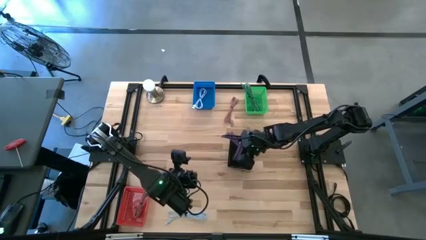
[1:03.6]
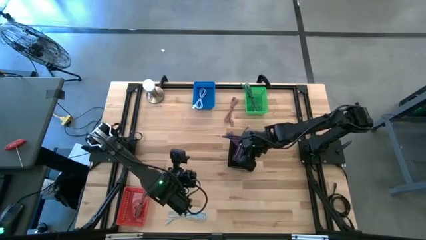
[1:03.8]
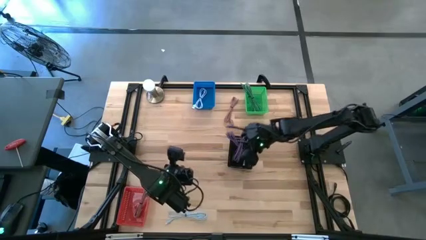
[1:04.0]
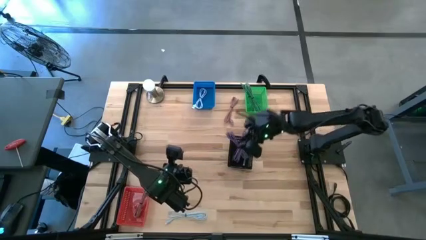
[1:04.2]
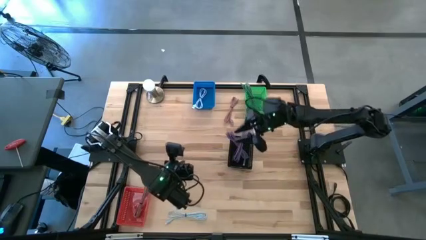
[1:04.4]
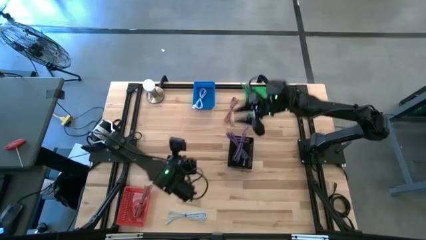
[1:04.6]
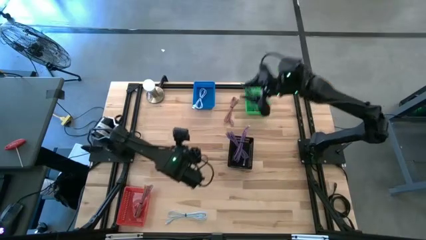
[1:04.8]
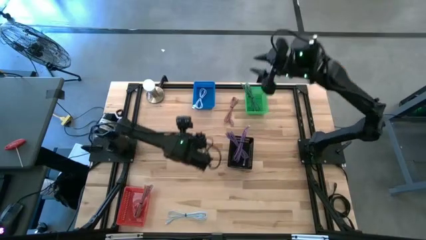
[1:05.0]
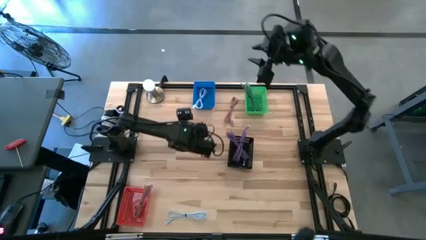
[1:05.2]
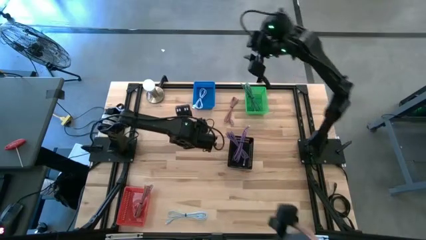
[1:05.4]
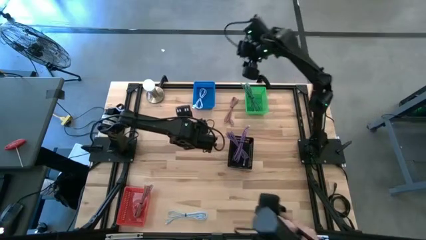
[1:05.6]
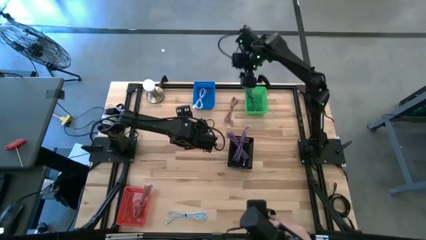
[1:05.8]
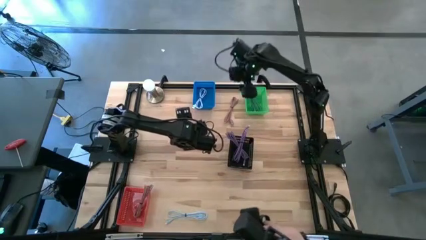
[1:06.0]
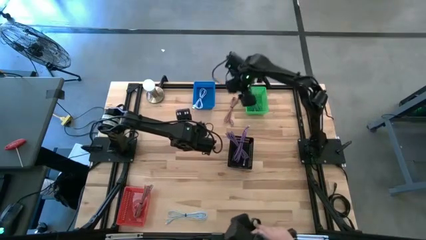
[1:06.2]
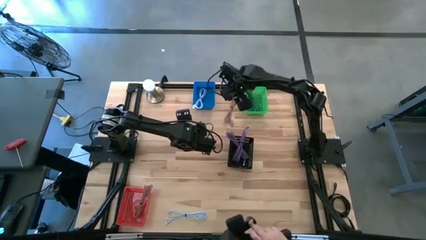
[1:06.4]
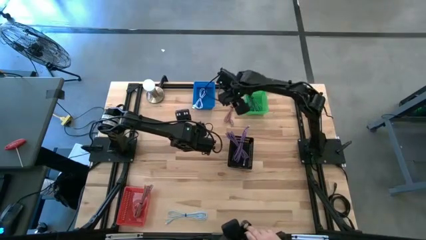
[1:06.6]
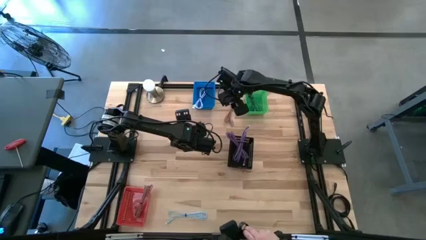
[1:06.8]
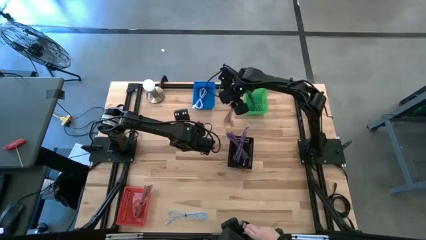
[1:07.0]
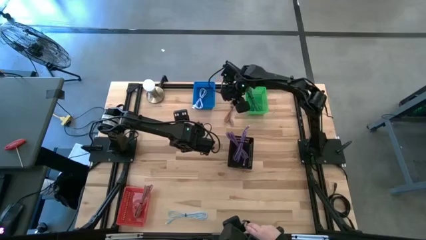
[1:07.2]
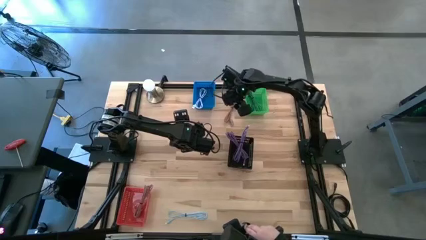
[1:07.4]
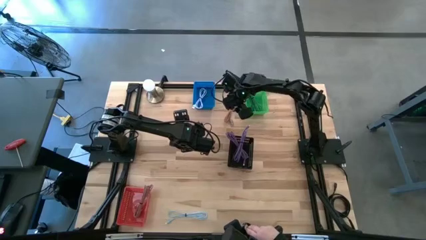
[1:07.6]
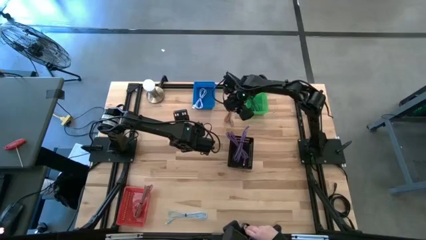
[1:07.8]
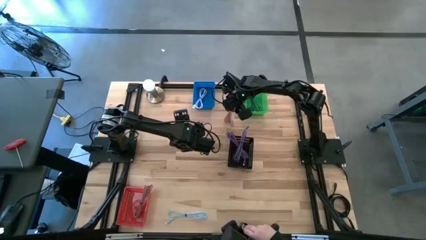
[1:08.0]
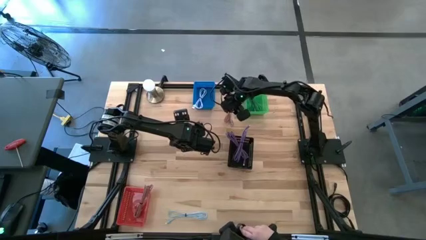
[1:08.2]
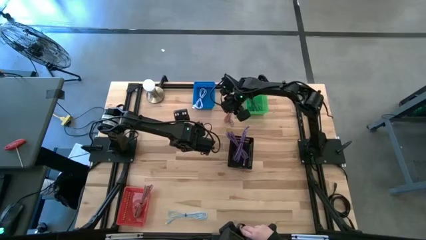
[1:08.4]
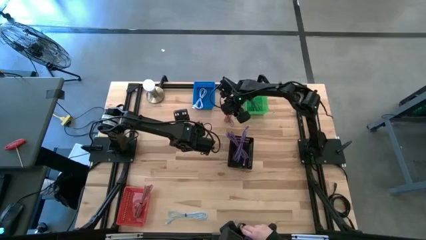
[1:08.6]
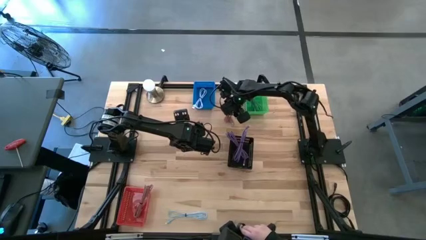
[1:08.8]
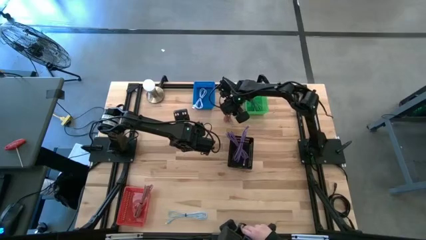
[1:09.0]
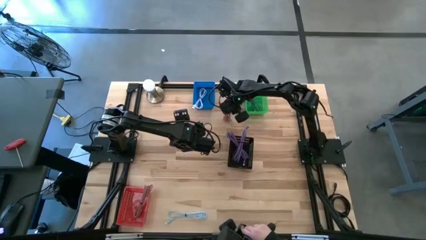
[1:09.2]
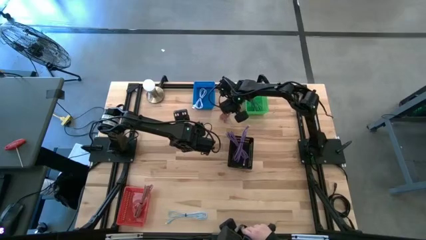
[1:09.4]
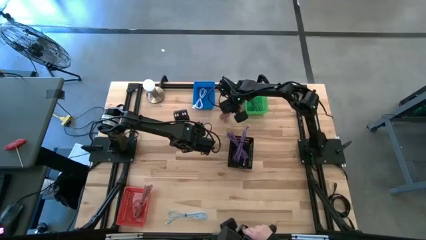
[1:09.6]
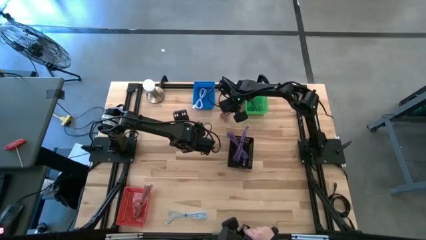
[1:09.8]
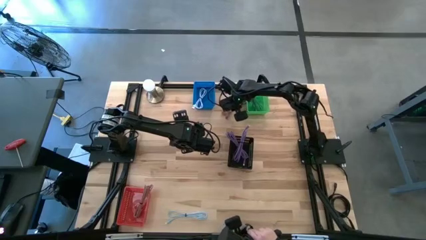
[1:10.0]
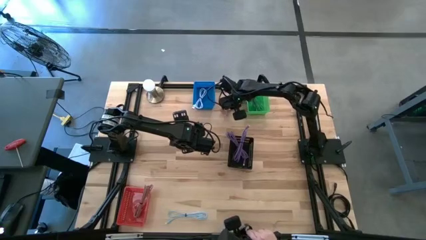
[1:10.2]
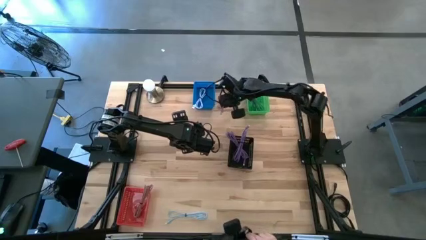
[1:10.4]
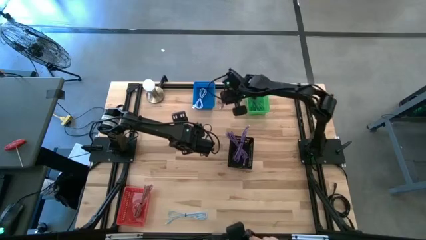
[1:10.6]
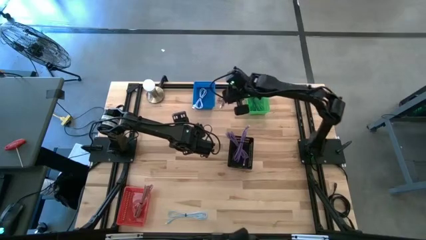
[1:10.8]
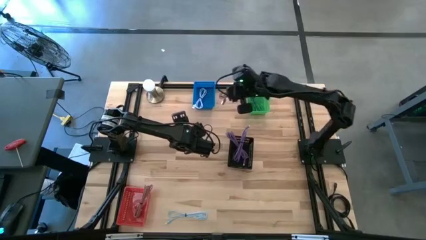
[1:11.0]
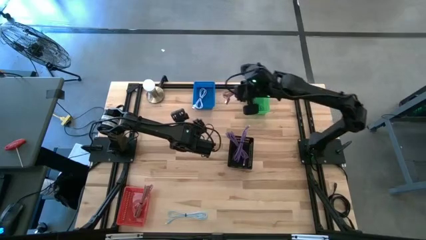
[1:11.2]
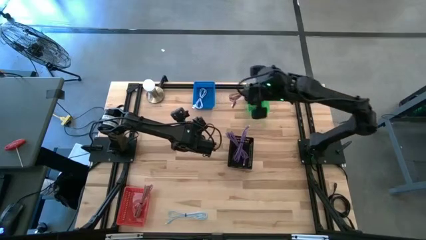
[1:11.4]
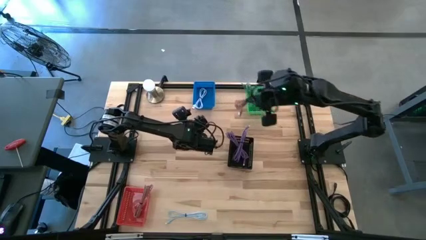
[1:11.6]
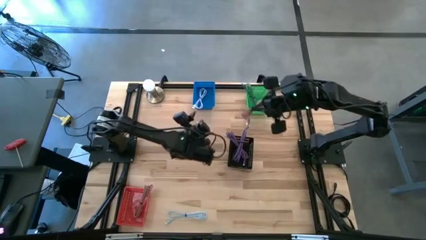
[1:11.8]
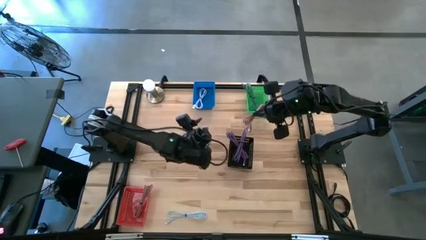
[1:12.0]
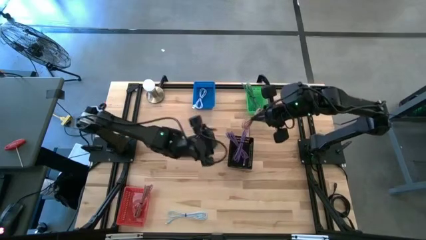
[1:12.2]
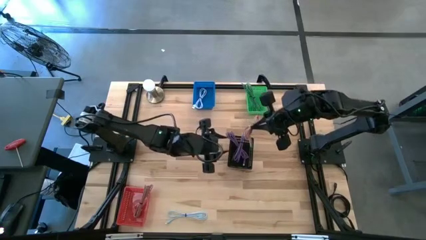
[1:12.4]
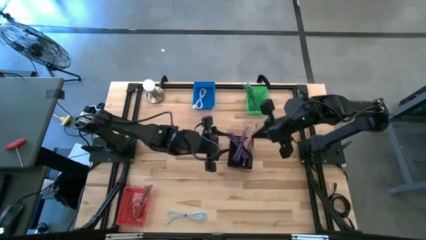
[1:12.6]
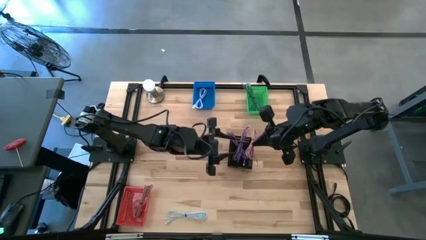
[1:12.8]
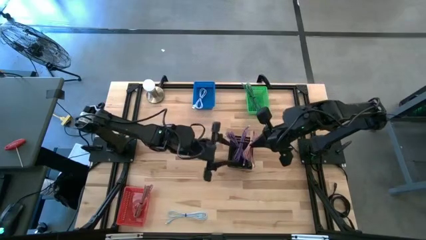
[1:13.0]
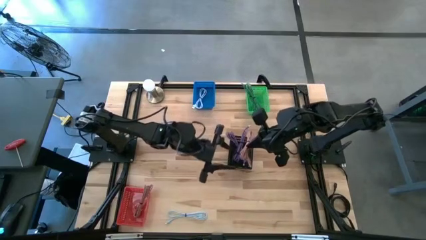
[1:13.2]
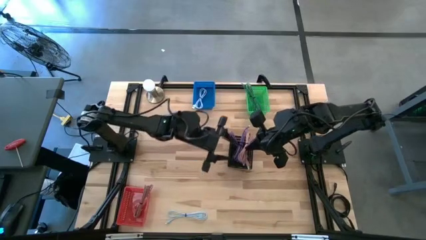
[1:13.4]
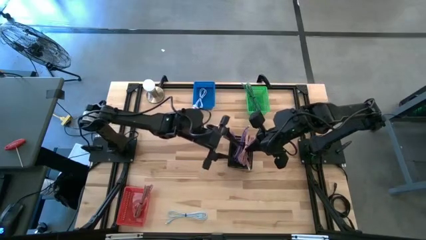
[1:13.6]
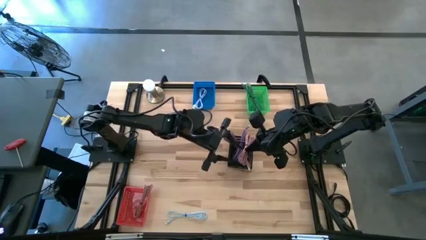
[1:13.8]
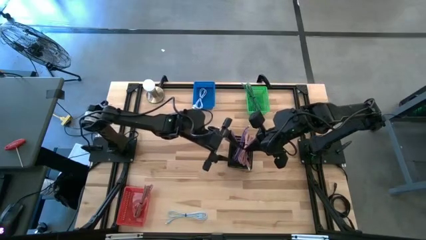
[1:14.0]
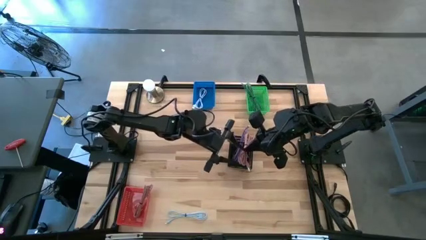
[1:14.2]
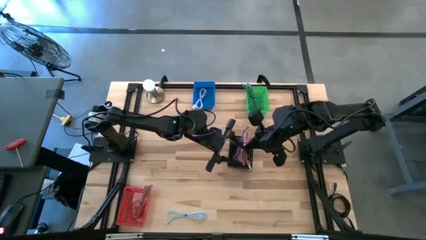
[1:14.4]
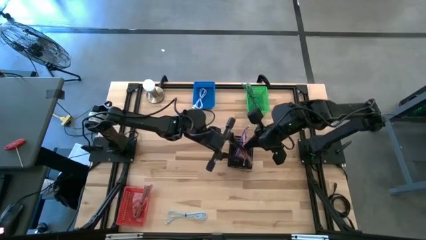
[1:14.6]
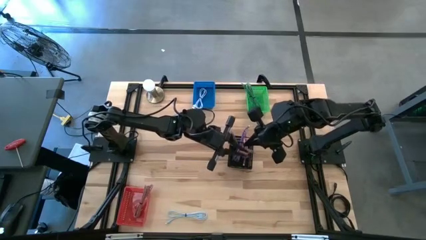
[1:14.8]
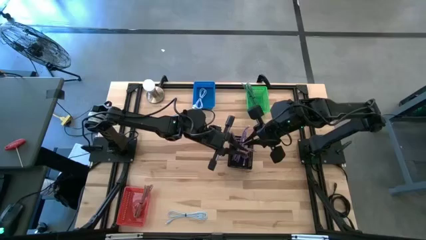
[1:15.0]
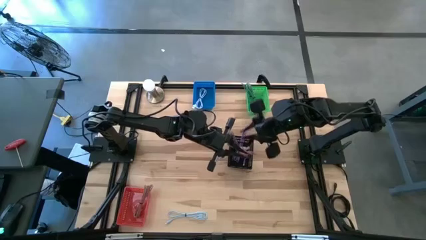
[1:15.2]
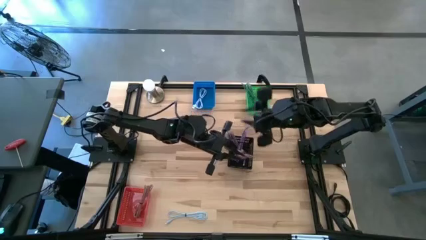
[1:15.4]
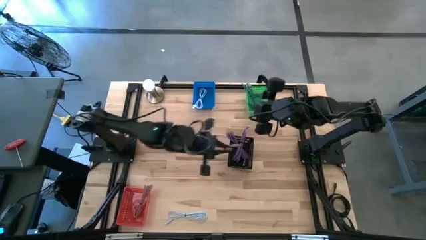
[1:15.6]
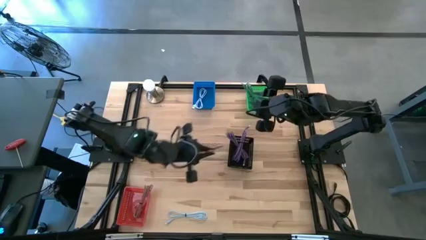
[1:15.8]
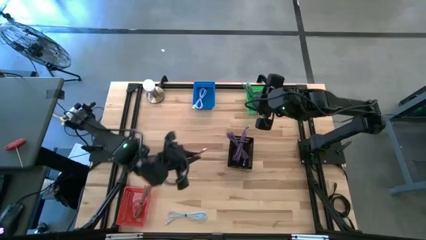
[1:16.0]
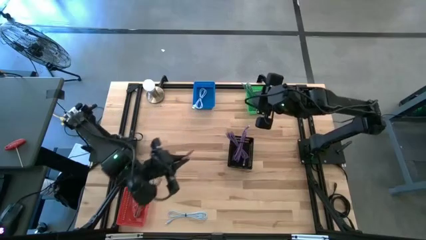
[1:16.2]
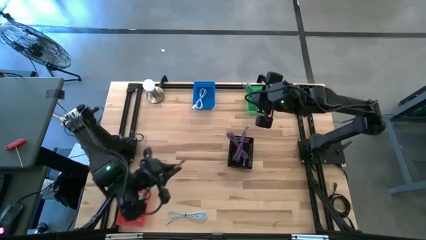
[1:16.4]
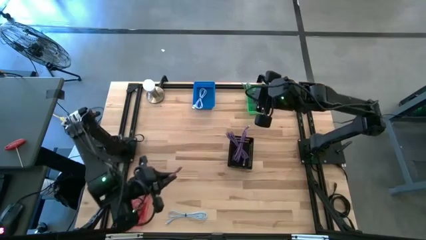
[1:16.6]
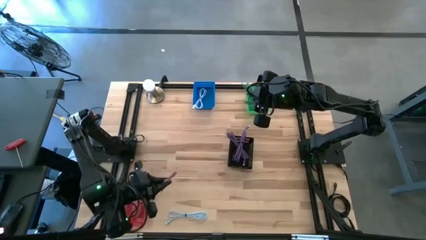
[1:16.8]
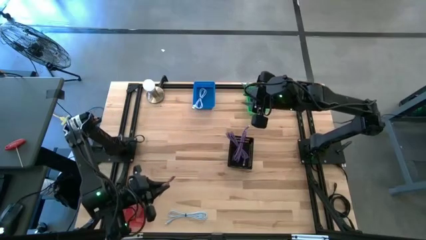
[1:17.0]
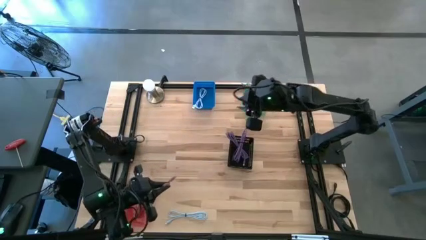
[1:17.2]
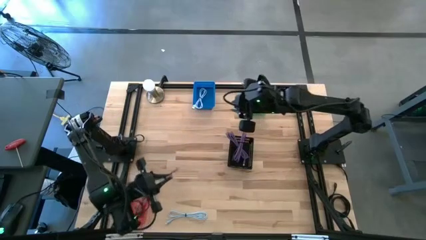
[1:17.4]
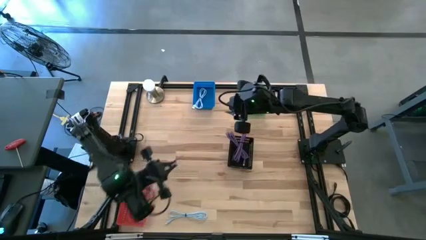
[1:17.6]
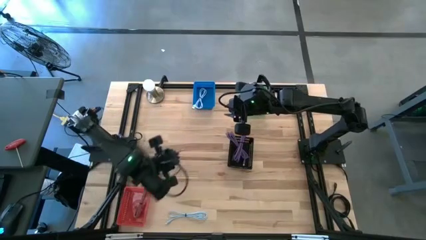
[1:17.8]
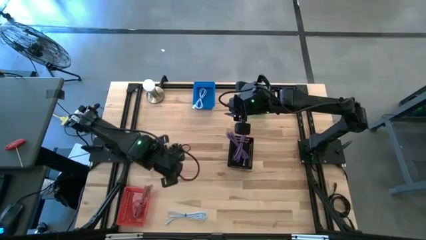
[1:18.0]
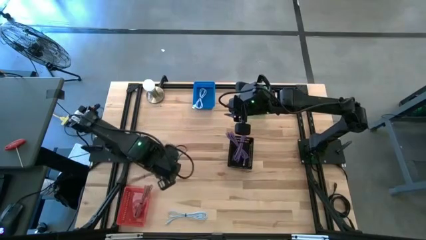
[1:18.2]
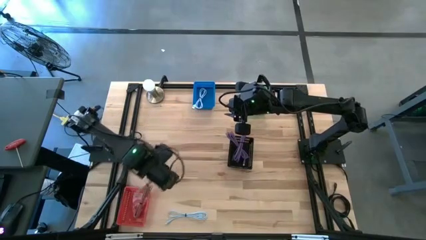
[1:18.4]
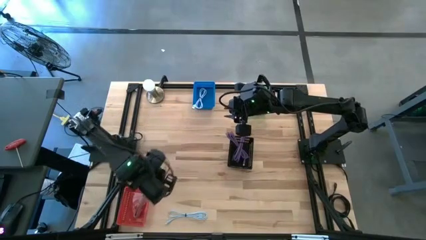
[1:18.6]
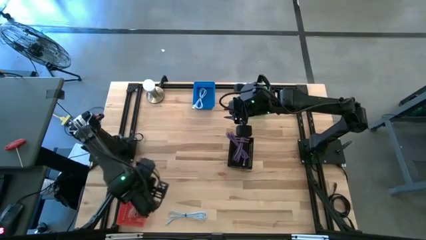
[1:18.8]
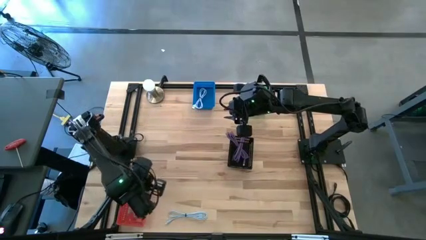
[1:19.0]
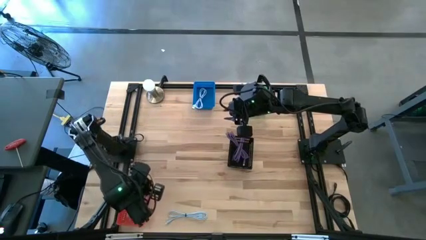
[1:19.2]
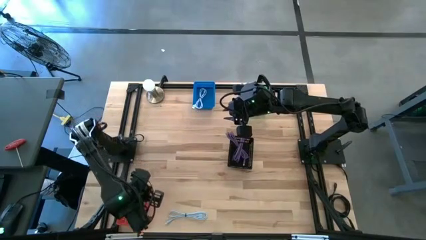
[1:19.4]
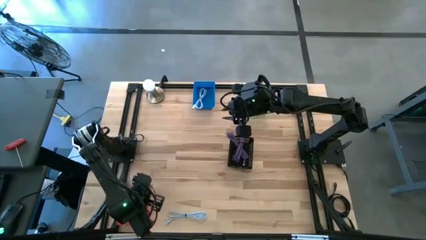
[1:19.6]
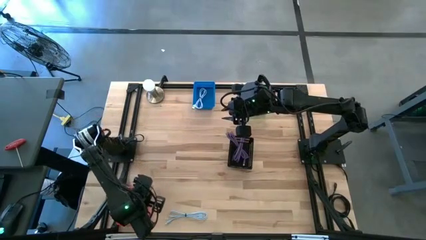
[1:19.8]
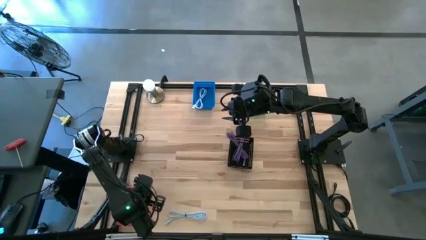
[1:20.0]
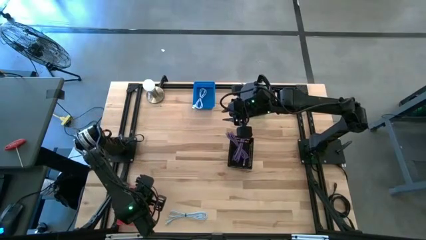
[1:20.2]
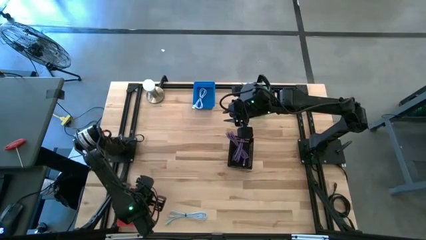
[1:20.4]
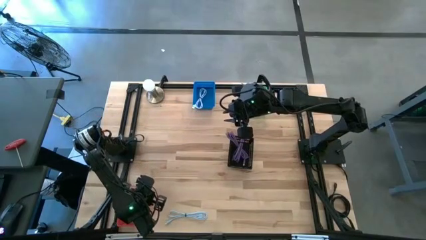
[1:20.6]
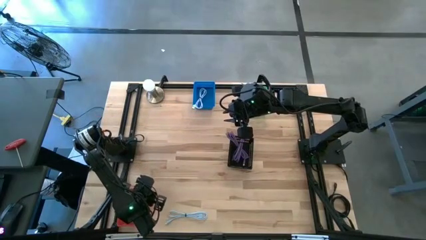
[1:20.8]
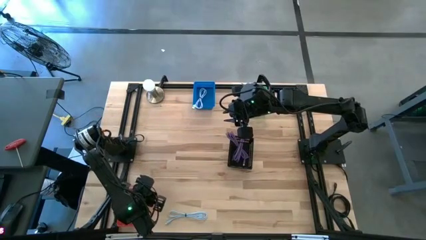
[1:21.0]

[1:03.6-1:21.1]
Task: Pick & Place USB Port
Put the pink charger cable into the red bin
